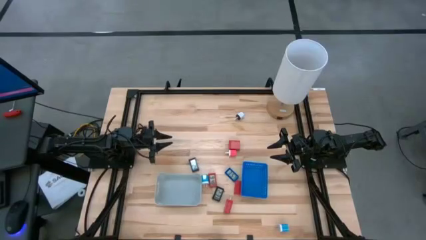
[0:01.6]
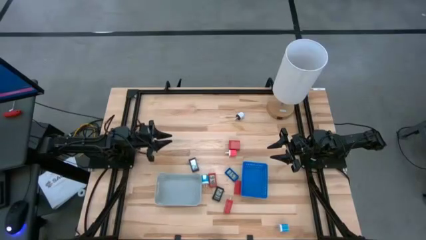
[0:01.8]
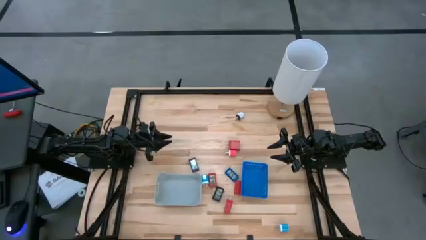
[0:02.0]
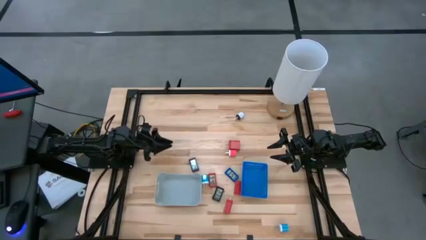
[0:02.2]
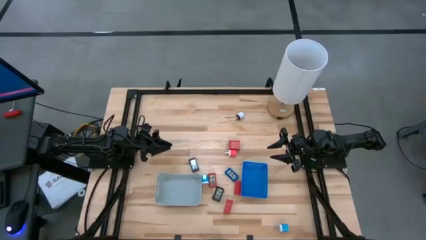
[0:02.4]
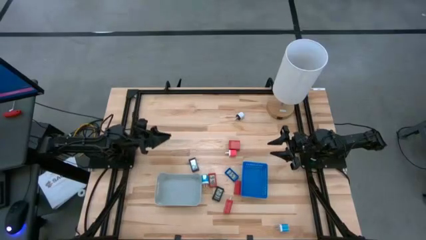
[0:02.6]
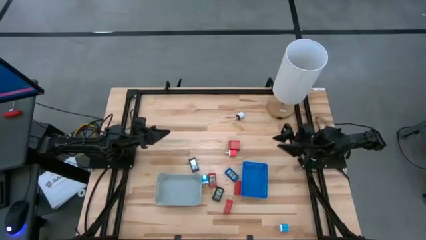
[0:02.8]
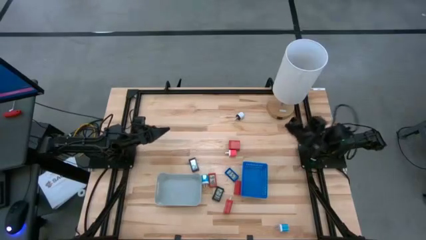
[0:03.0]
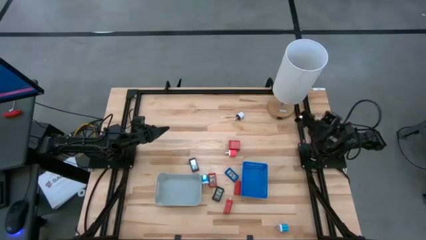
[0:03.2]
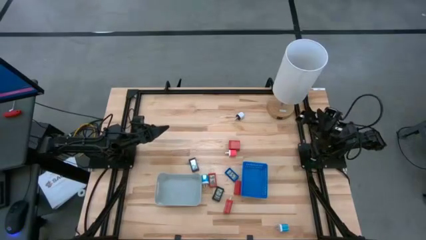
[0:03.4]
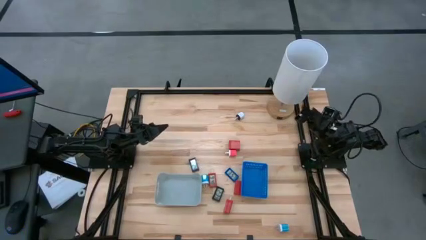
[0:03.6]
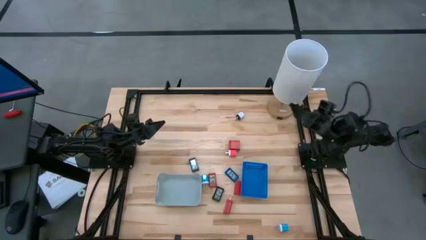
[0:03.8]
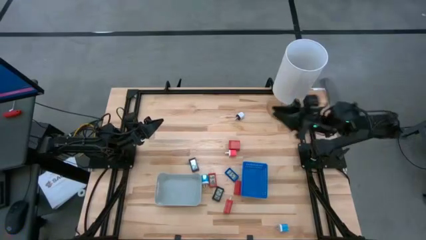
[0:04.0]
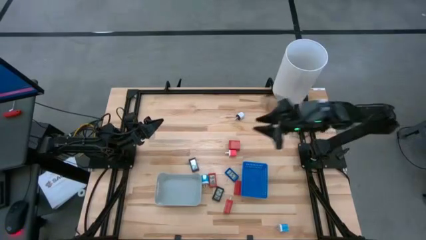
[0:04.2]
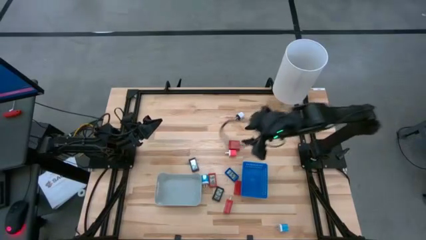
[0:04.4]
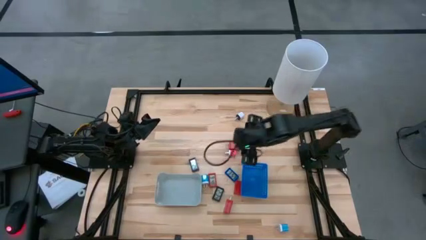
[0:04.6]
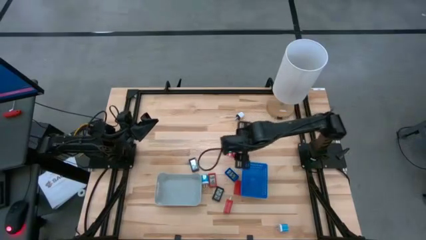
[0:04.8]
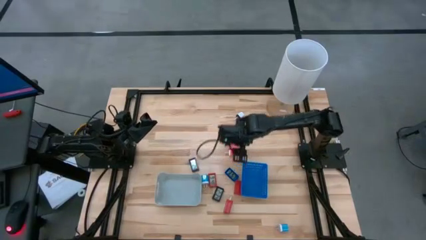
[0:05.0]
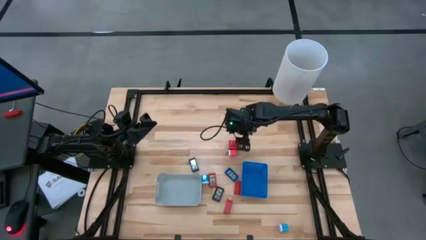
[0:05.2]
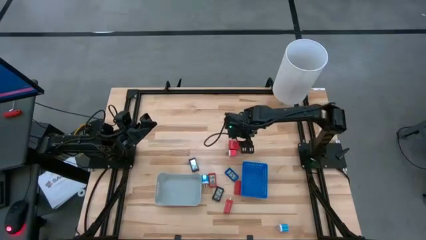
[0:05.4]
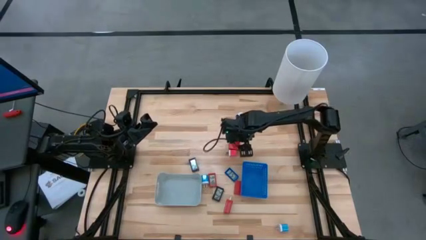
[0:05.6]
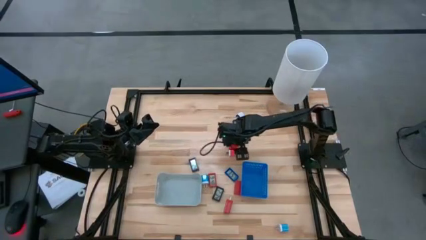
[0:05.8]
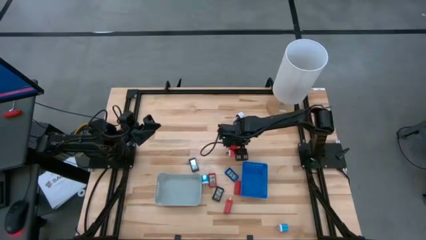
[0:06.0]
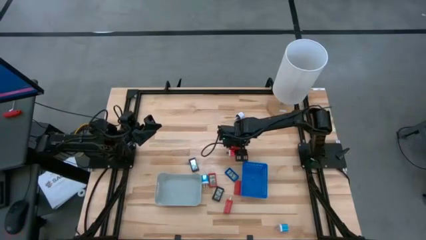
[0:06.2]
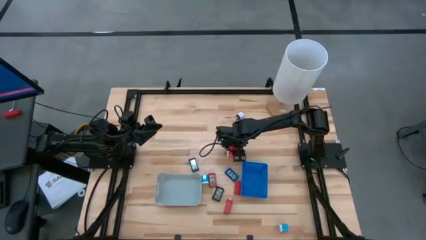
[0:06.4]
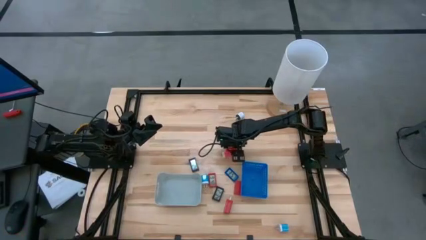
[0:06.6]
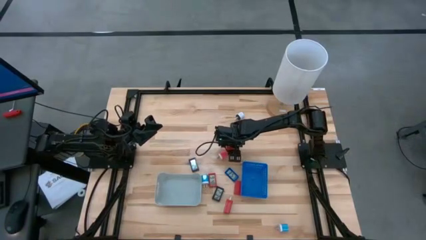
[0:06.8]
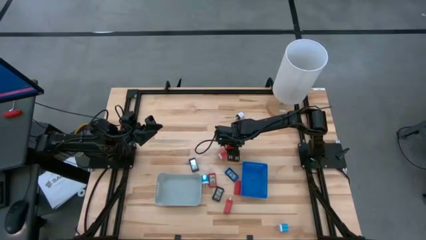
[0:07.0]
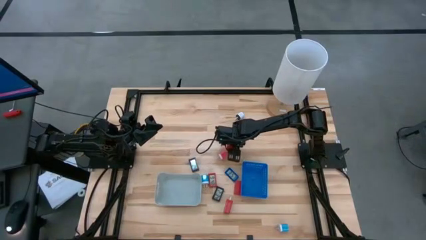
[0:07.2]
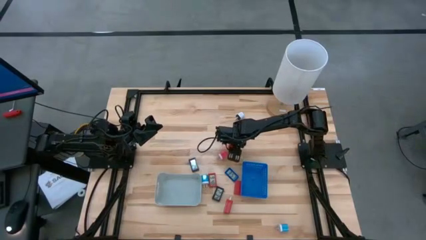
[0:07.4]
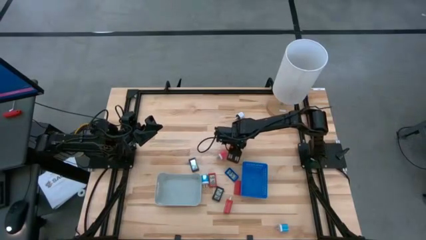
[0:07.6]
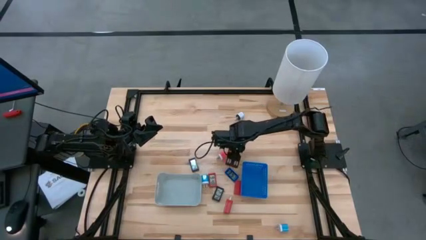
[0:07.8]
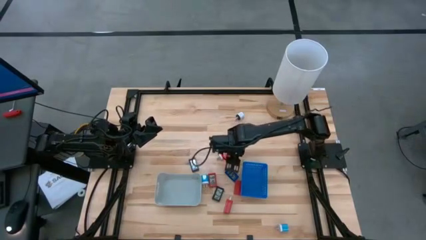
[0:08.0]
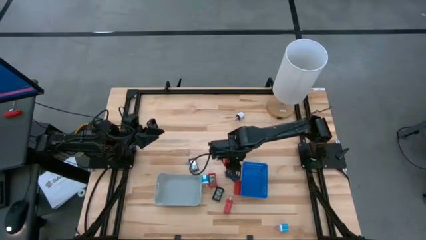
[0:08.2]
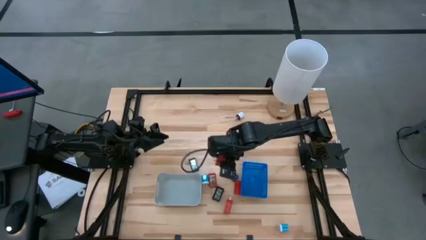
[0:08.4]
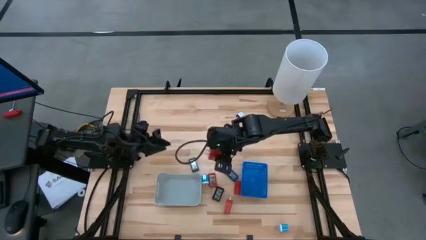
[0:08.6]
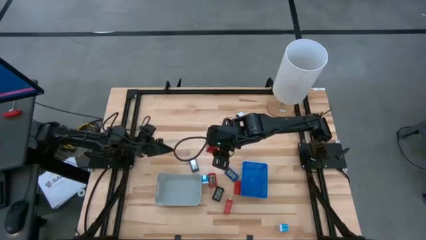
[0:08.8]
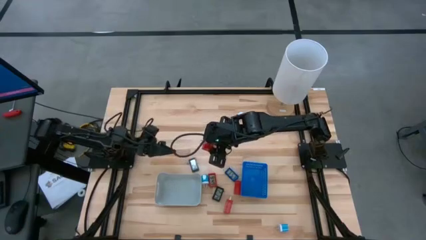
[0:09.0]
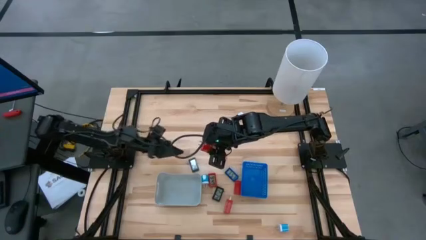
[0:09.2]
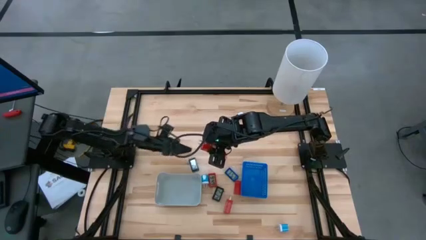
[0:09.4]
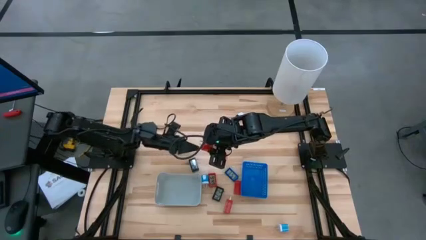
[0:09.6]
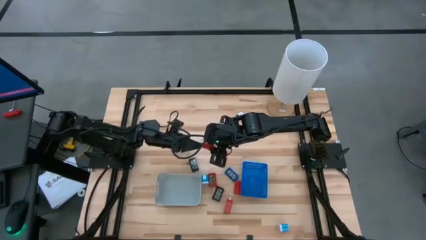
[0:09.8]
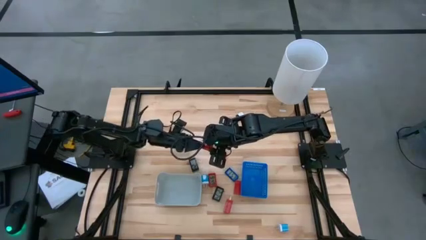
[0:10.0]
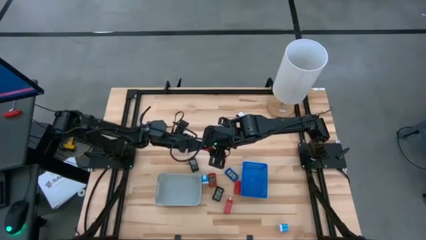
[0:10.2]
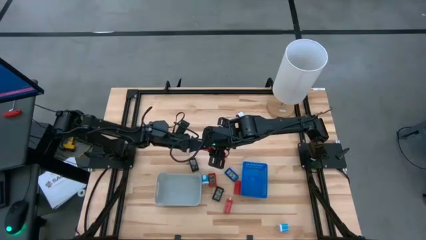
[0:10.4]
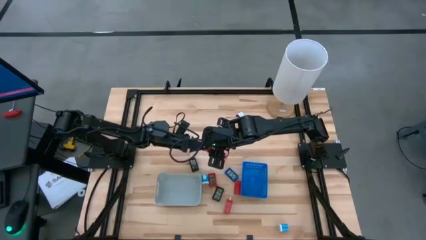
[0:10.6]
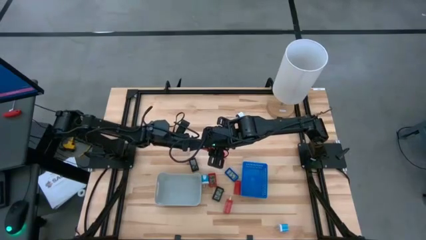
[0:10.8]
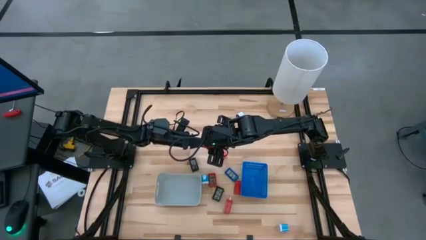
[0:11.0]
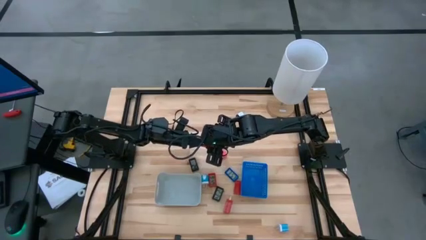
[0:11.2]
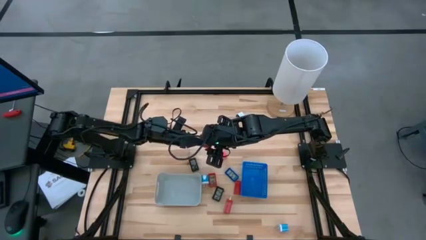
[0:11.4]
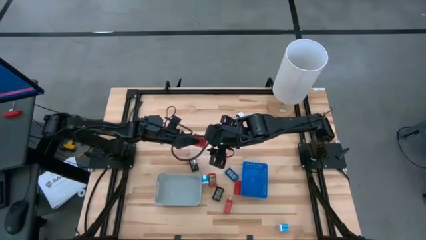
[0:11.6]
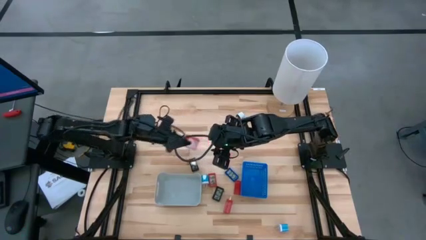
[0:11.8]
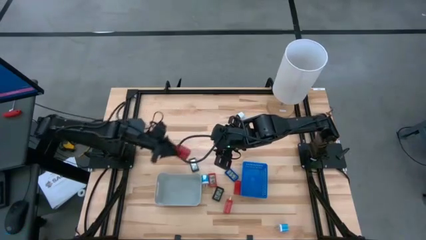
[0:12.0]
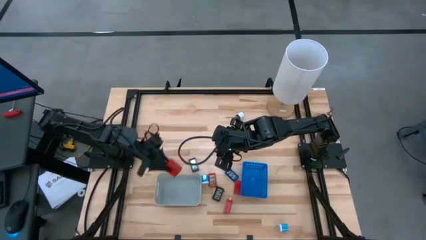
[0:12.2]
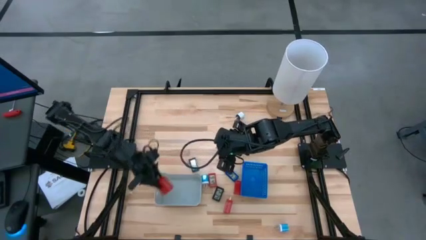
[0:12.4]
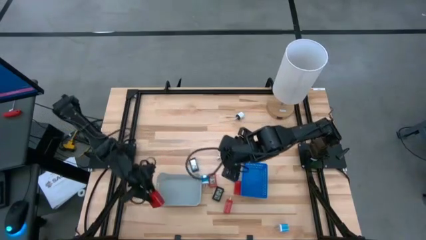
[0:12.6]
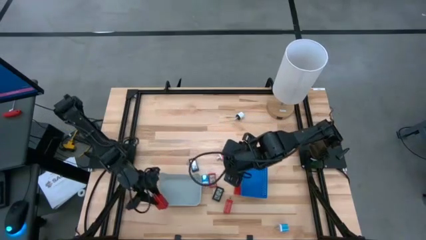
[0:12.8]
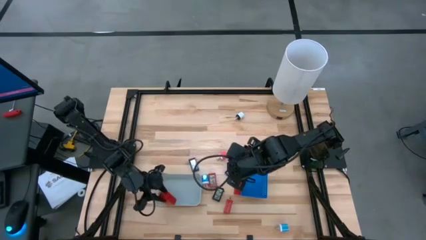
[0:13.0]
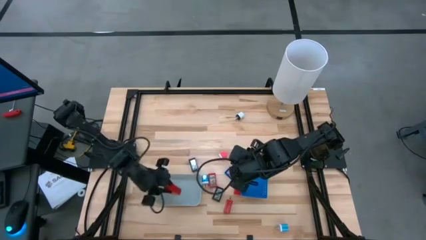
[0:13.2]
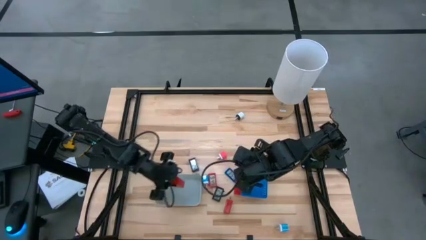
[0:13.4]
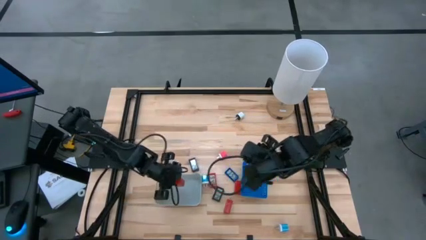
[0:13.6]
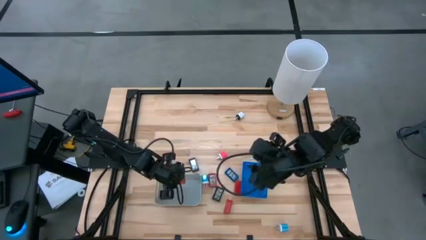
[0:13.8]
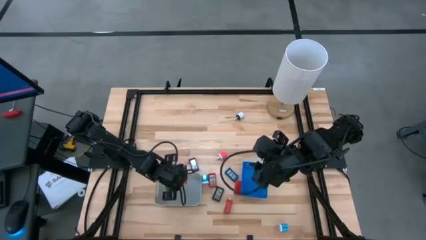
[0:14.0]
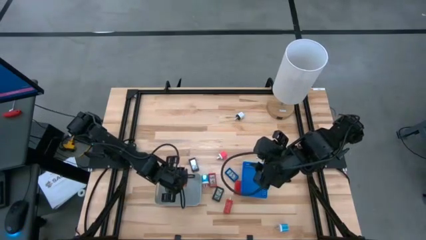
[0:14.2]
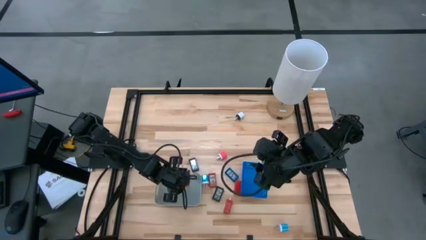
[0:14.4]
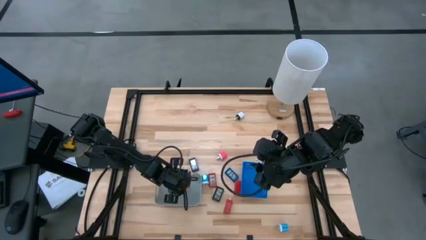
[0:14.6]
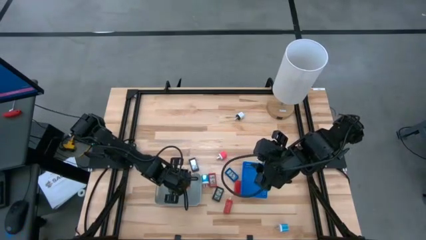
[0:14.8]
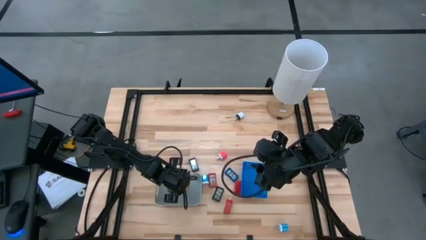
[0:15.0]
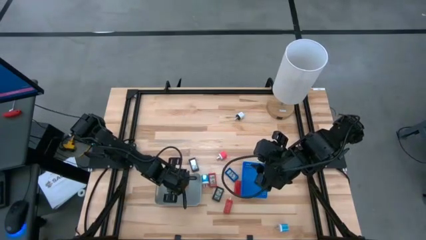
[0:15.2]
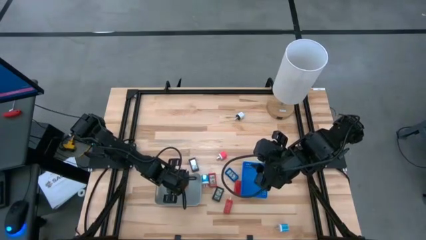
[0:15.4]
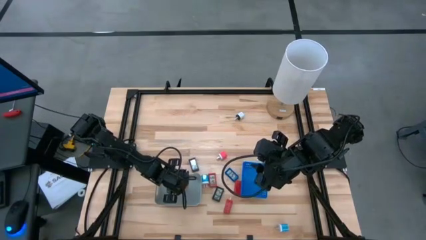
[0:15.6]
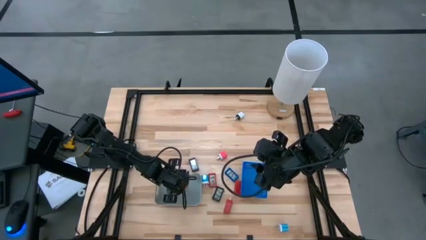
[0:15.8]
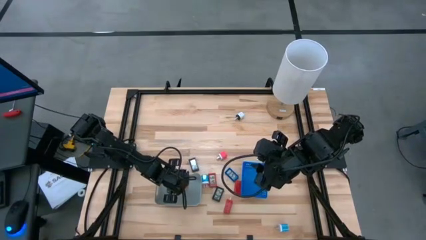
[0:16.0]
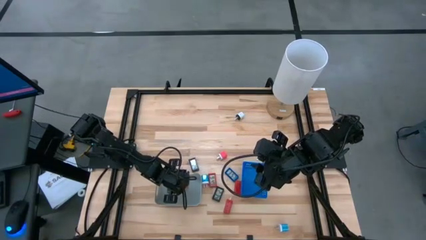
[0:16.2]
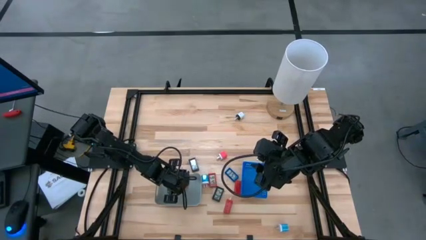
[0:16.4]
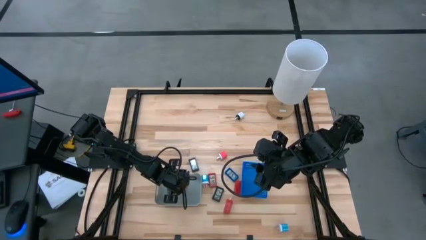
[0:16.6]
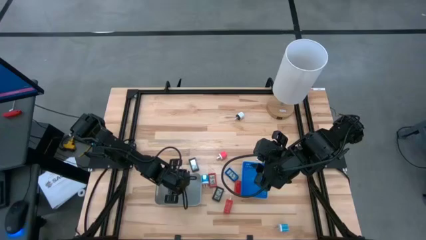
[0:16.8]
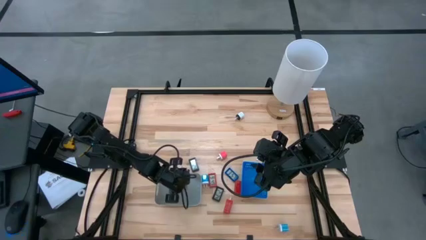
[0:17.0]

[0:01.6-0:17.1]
Task: Pick & Place Office items
Put the top red charger adapter into the gray bin
